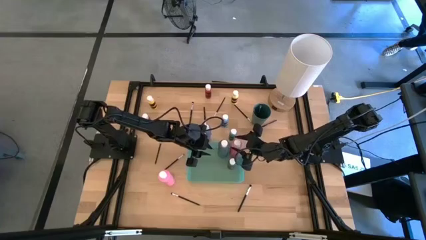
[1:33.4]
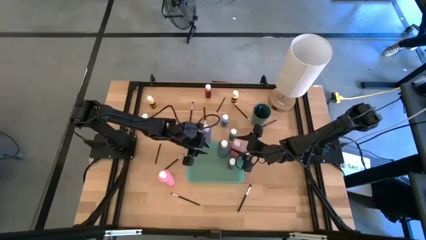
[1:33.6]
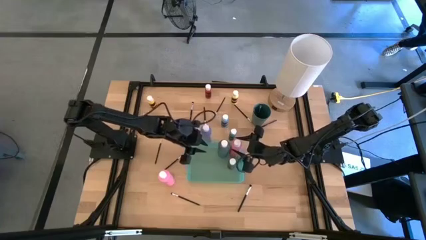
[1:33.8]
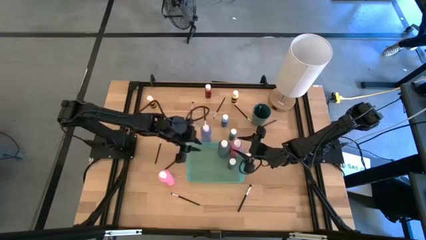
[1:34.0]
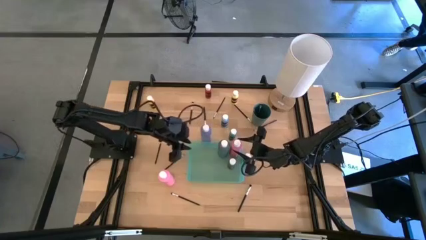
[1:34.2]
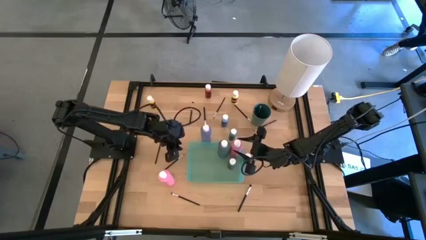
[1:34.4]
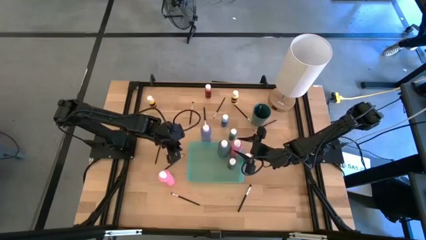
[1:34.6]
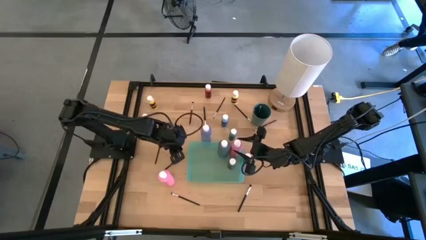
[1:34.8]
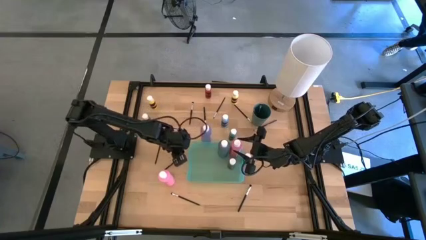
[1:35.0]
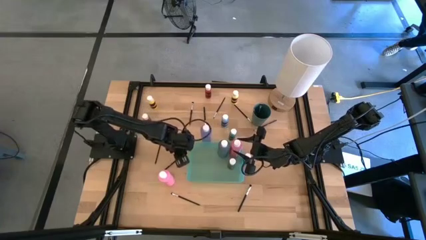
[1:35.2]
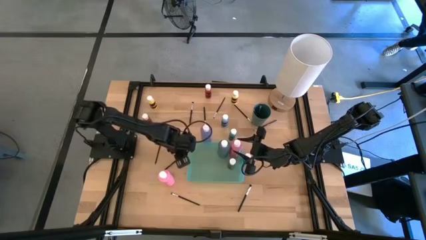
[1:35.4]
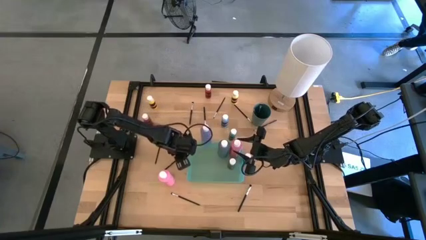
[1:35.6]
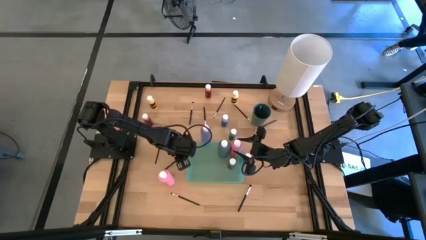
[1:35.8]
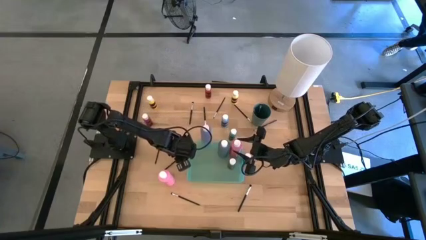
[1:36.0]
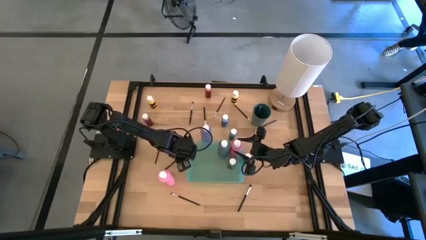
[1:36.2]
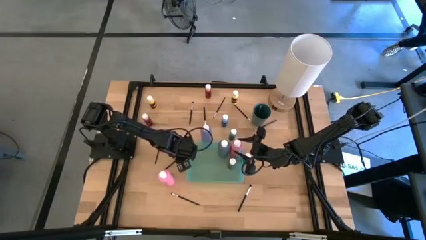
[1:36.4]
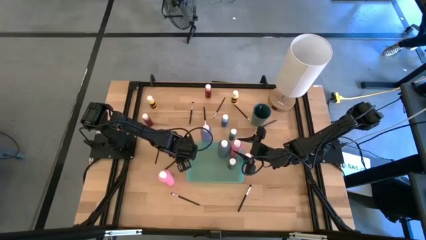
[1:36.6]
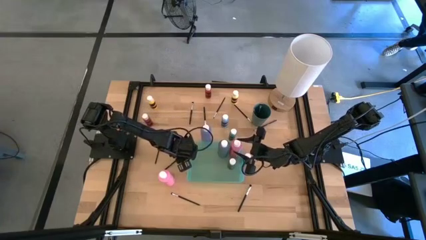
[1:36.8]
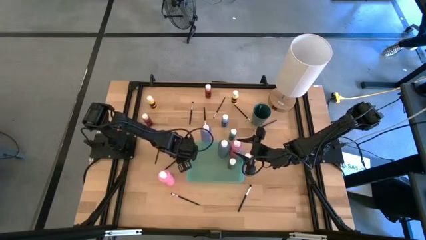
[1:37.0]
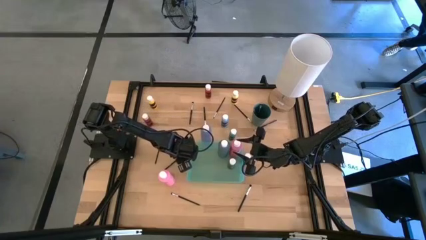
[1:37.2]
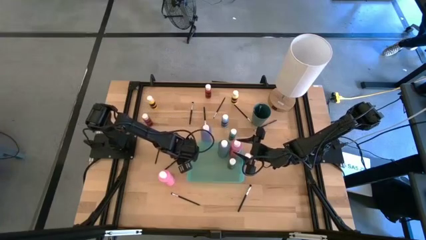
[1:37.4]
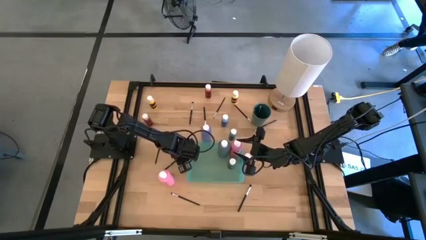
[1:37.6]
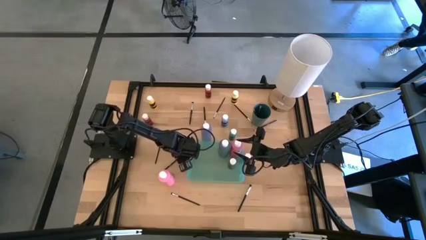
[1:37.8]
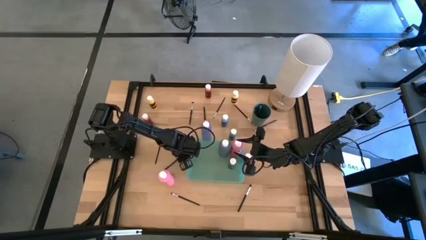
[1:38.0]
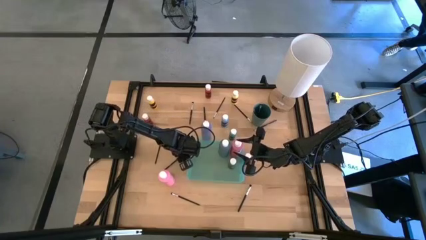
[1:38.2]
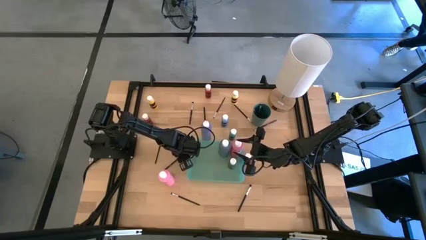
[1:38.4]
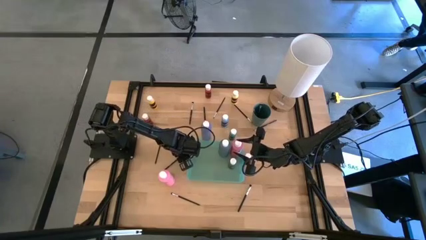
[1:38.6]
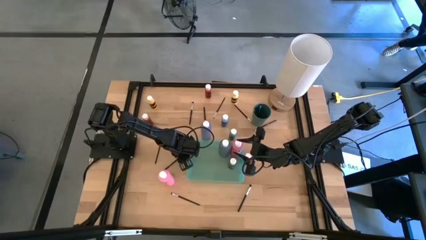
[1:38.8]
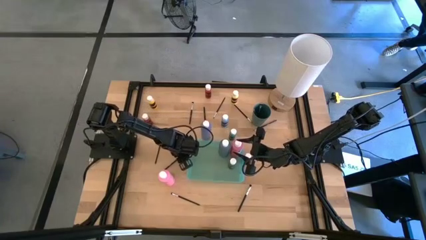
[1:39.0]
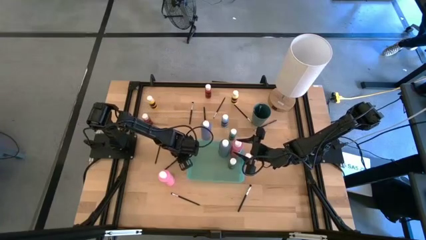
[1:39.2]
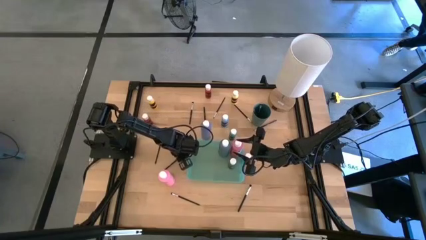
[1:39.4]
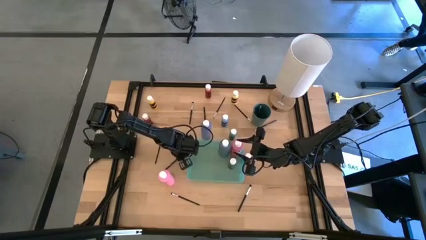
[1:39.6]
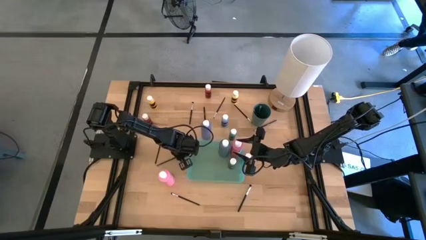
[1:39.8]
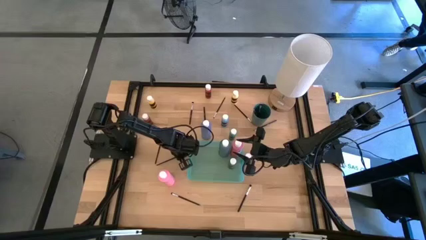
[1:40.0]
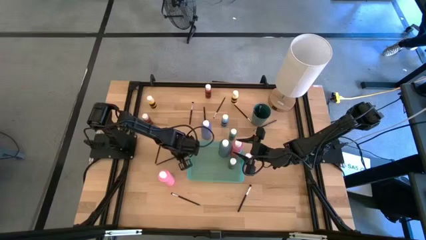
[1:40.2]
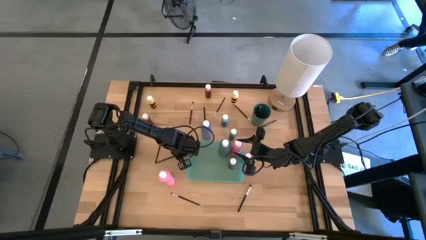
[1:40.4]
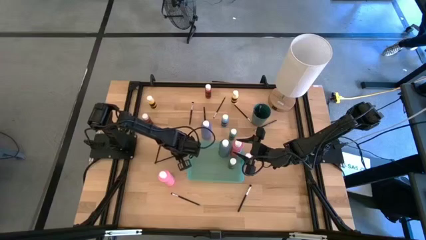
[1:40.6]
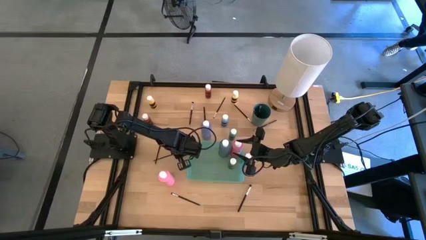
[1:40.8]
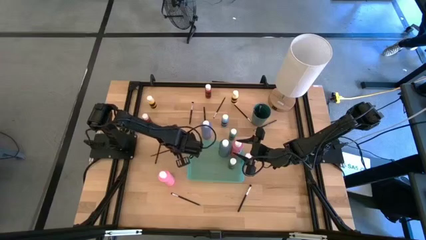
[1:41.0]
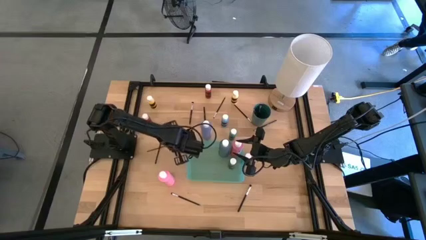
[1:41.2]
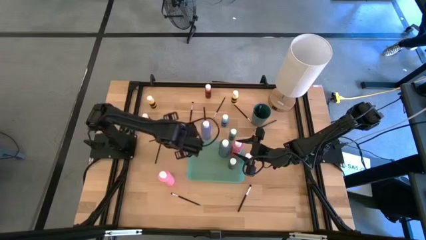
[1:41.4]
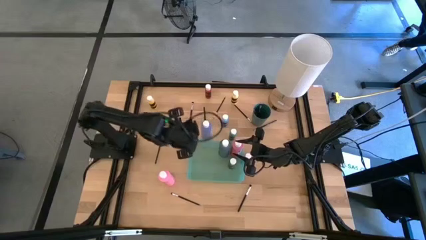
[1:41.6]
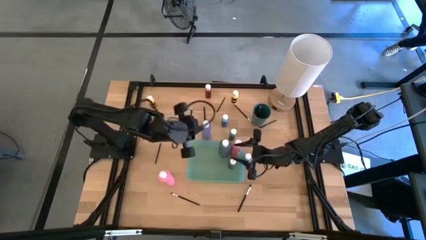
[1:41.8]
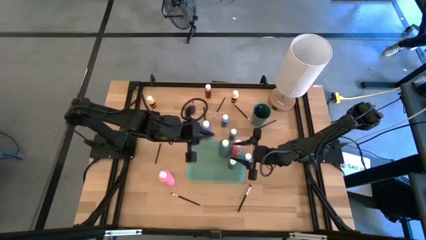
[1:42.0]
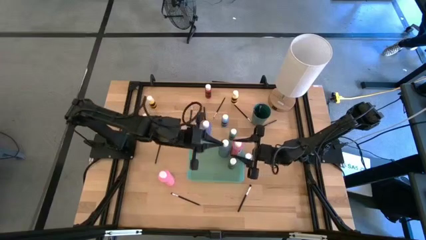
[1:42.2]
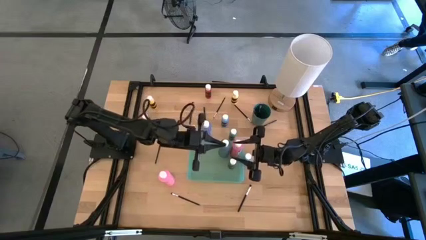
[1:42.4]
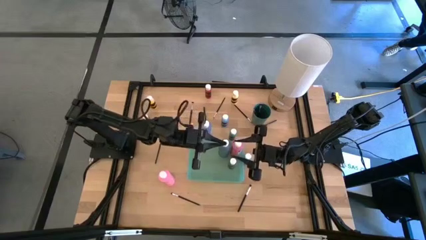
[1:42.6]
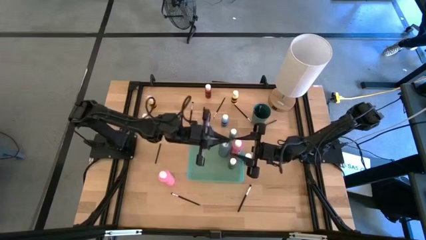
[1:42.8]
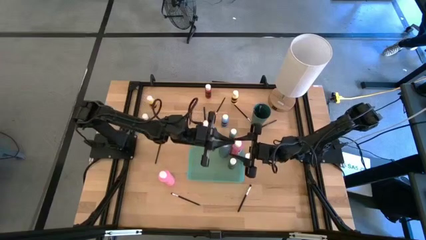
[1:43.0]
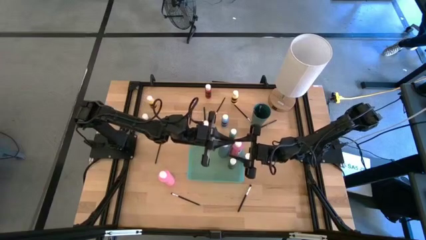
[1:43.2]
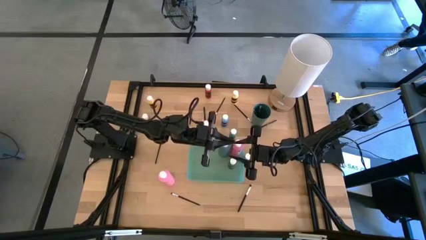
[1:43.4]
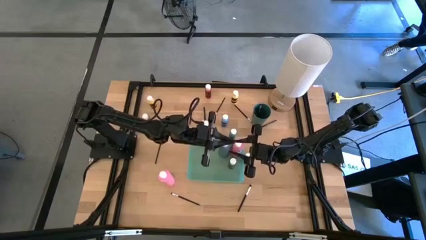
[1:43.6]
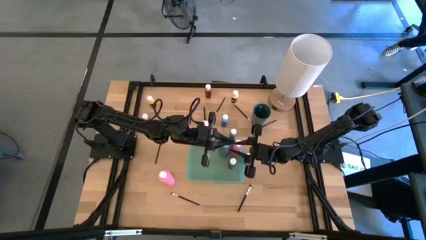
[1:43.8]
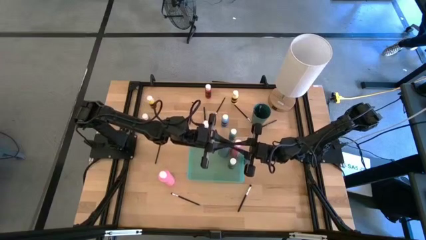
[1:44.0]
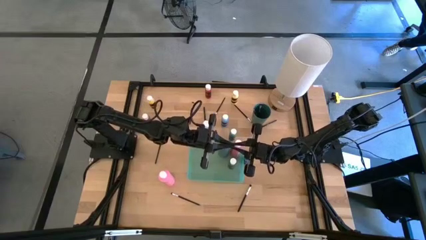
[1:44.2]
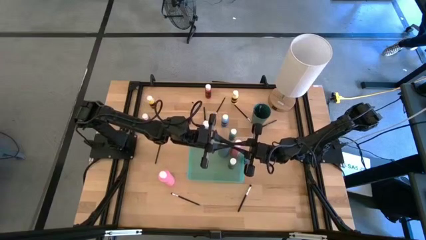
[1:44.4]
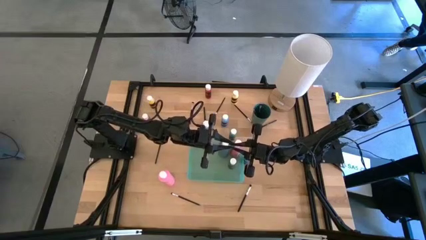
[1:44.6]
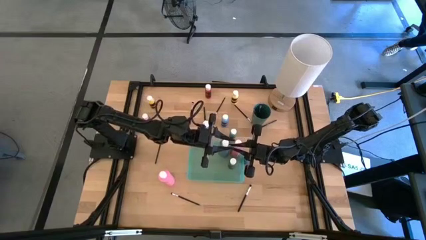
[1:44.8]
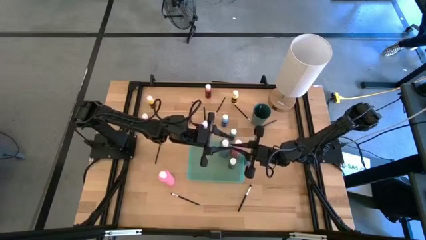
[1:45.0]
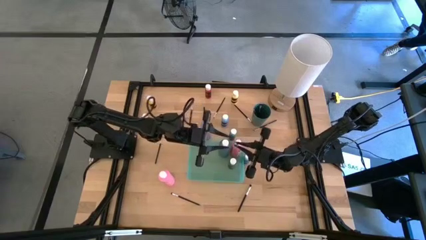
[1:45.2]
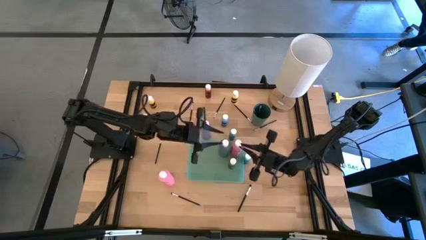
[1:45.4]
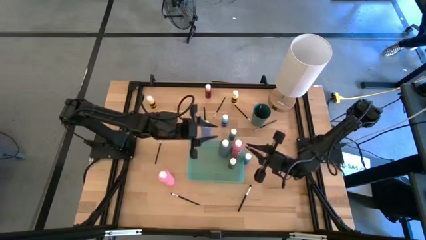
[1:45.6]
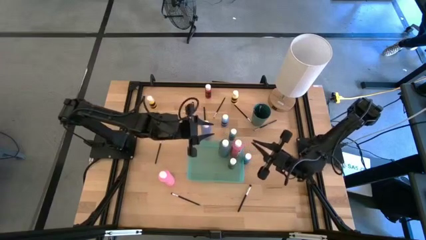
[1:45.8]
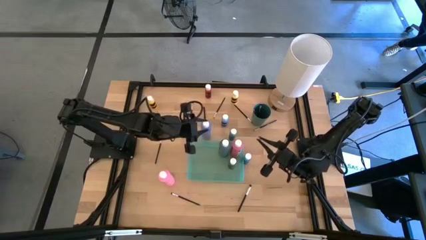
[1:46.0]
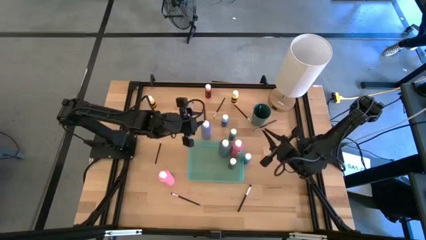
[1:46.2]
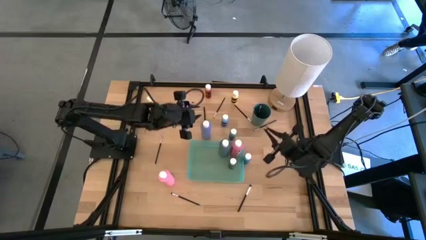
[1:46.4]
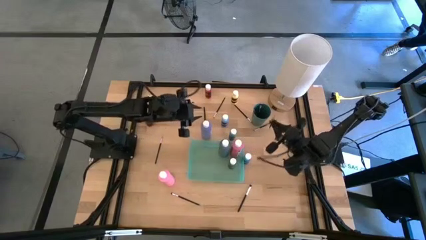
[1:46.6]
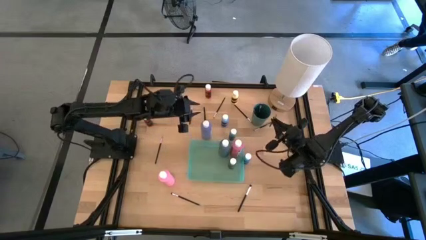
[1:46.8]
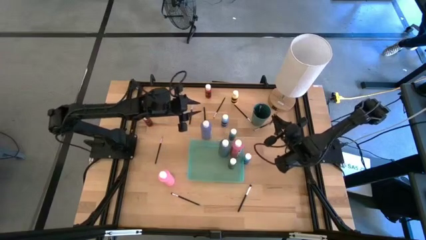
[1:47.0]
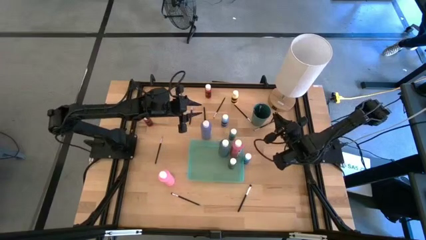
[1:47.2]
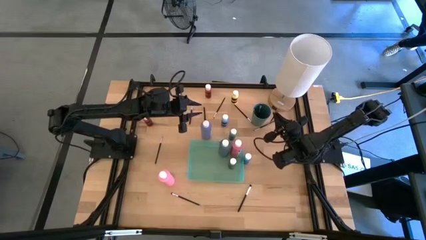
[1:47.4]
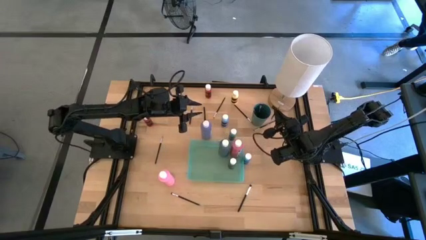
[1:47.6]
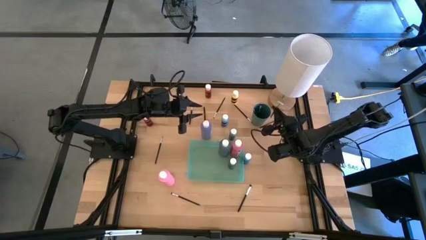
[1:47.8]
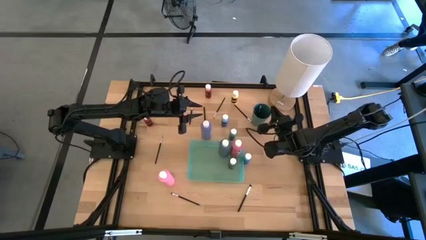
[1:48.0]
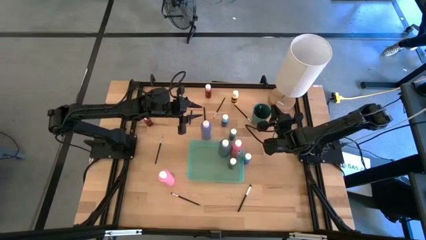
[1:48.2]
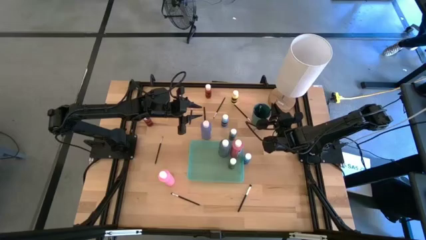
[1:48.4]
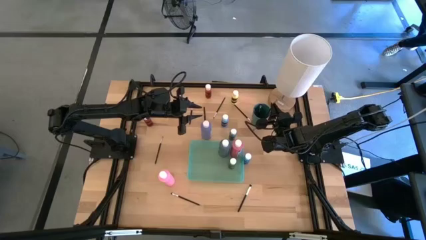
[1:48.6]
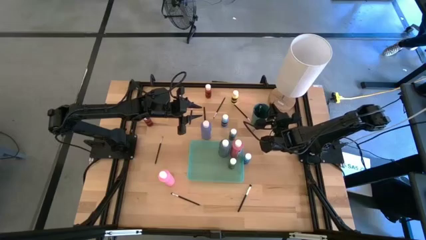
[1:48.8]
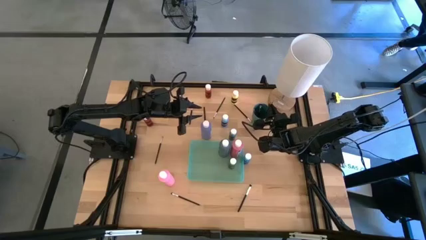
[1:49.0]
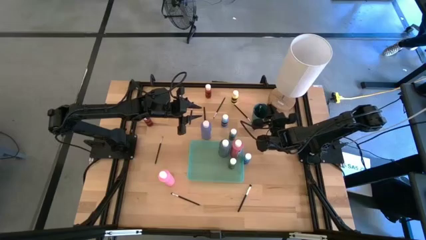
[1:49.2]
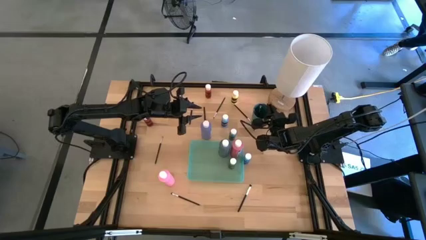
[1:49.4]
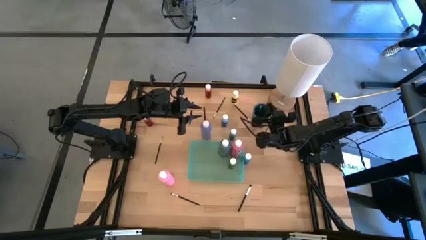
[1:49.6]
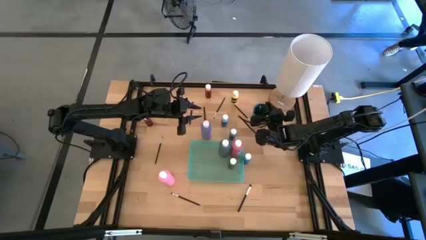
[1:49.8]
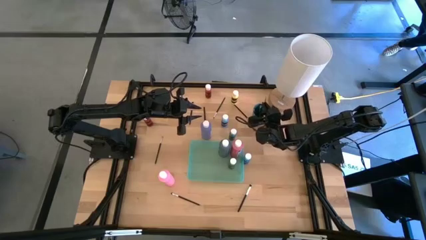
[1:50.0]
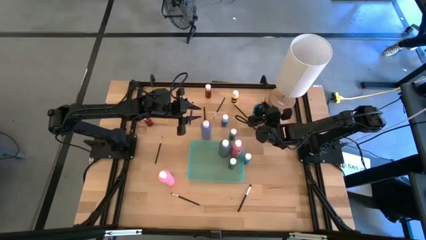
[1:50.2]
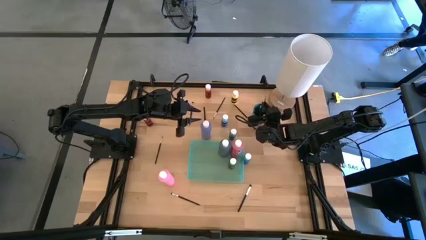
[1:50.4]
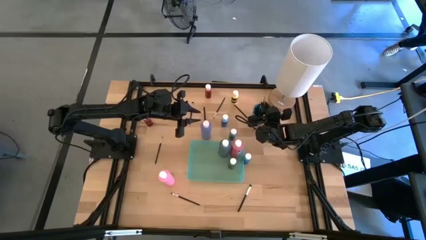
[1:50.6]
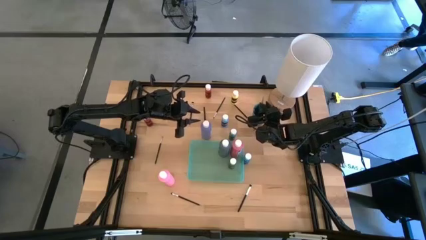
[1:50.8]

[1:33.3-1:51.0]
Task: Pick & Place Paint Supplies
Put the black eyeshadow brush into the green cup
